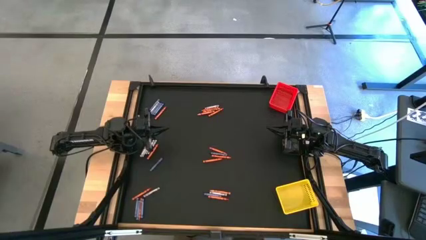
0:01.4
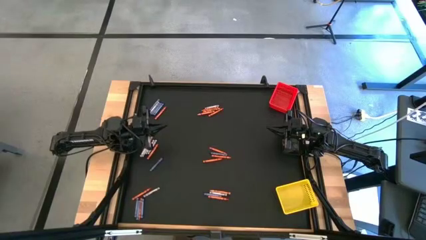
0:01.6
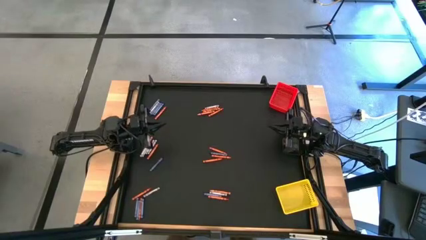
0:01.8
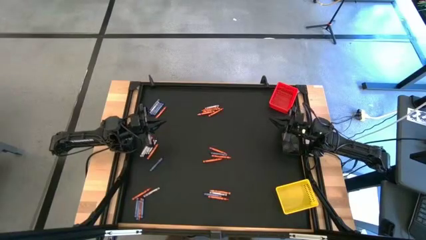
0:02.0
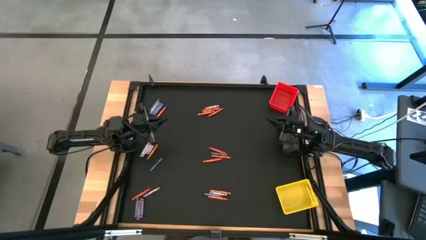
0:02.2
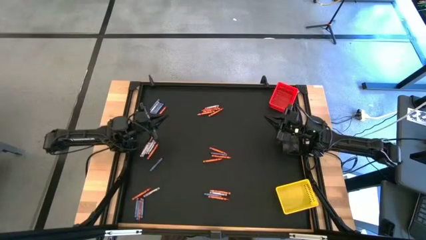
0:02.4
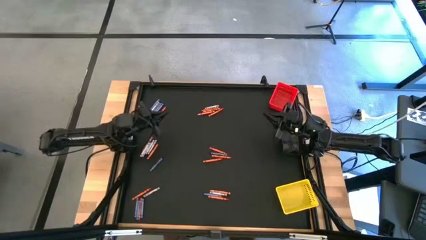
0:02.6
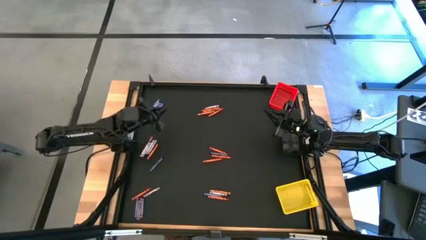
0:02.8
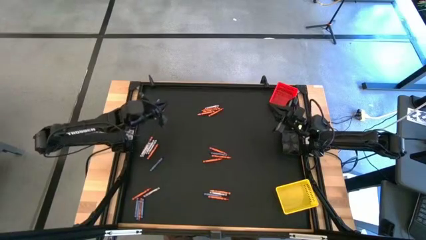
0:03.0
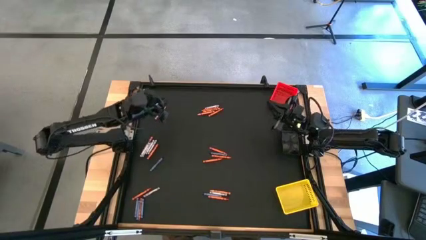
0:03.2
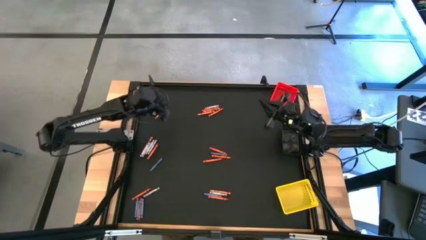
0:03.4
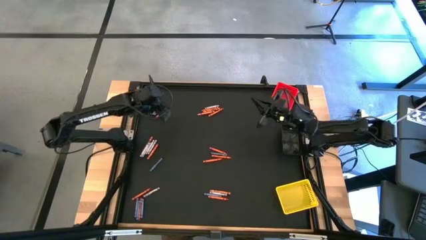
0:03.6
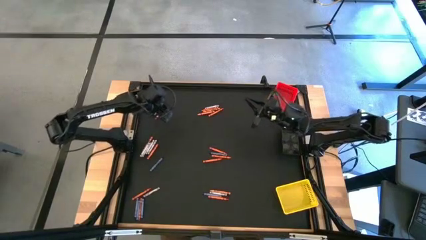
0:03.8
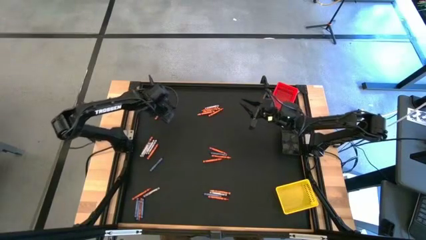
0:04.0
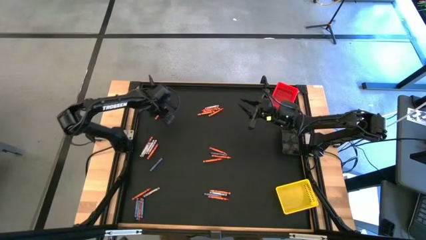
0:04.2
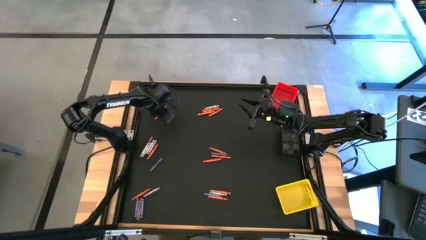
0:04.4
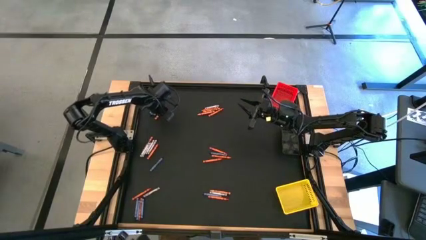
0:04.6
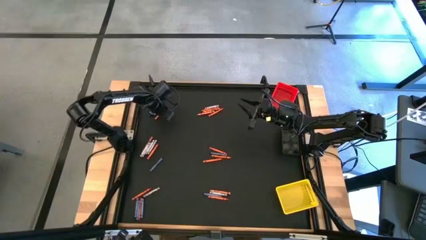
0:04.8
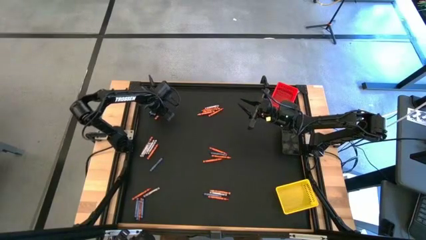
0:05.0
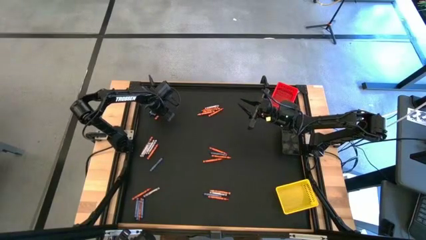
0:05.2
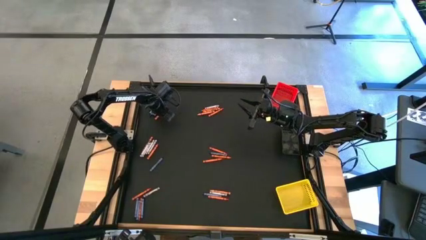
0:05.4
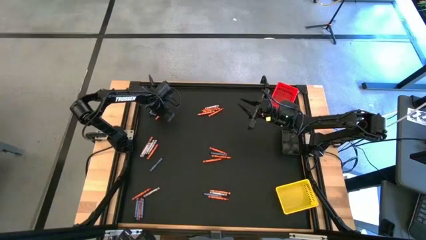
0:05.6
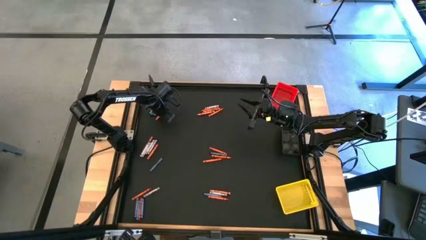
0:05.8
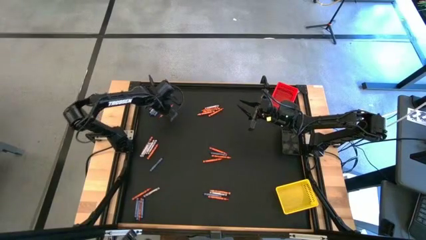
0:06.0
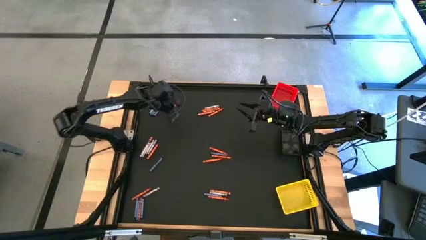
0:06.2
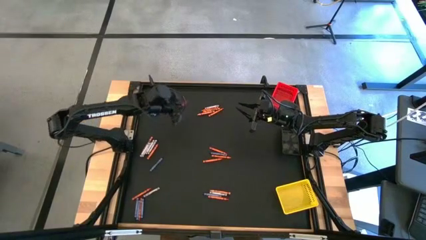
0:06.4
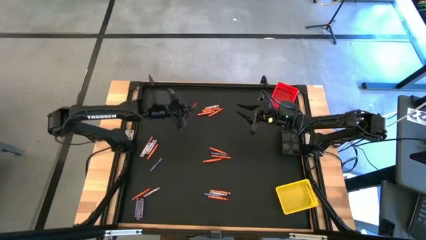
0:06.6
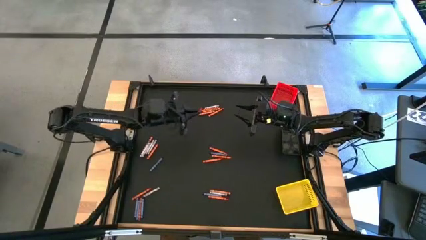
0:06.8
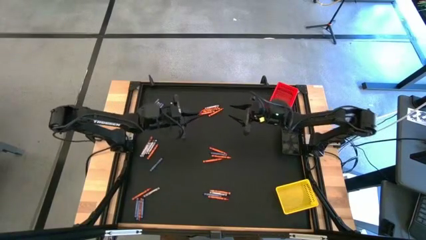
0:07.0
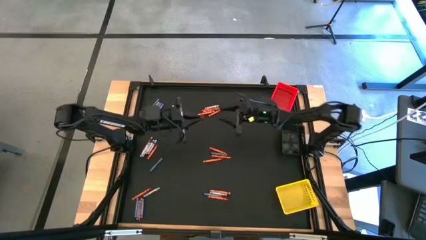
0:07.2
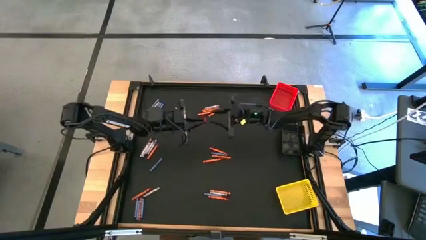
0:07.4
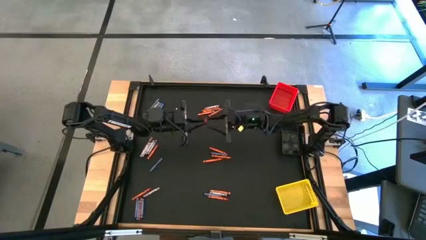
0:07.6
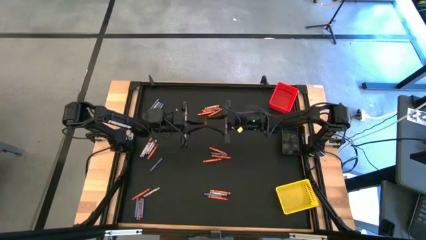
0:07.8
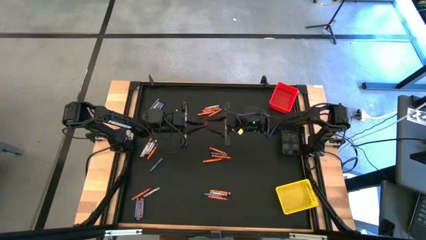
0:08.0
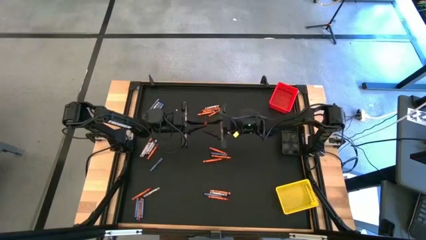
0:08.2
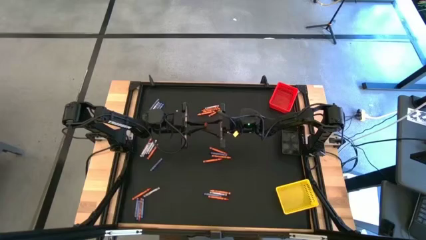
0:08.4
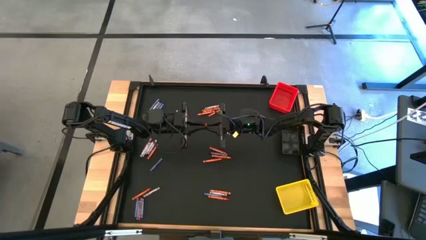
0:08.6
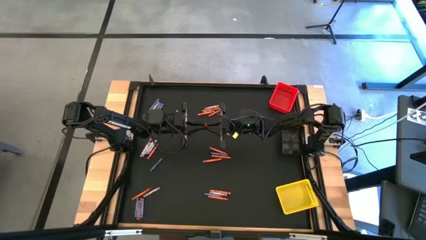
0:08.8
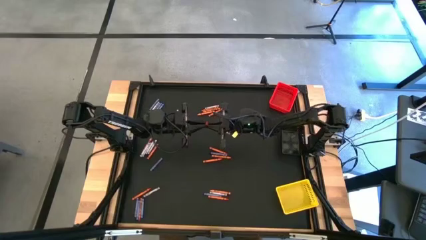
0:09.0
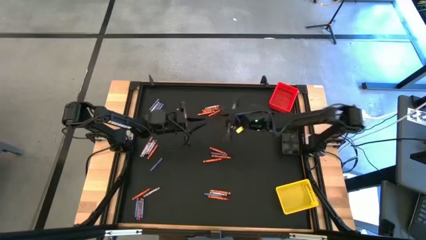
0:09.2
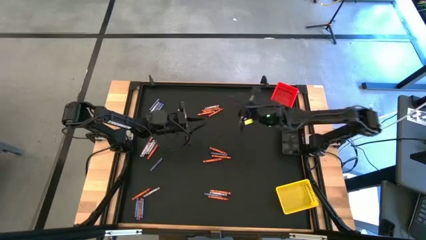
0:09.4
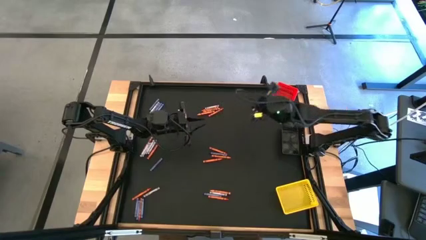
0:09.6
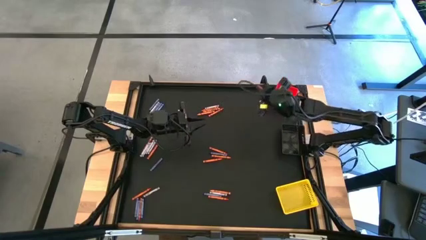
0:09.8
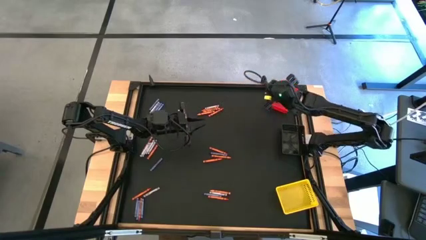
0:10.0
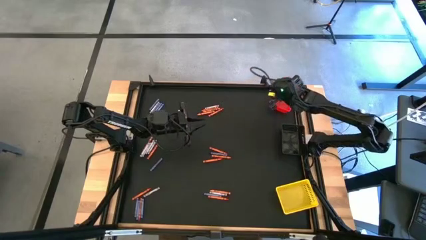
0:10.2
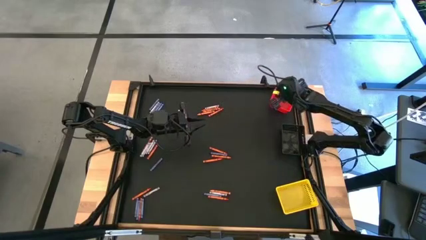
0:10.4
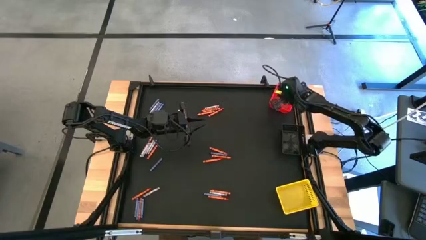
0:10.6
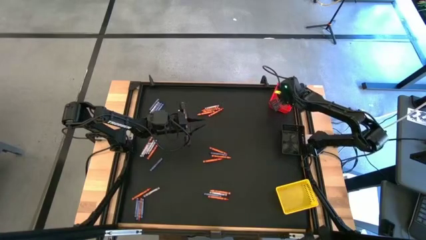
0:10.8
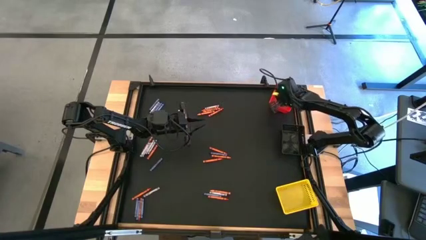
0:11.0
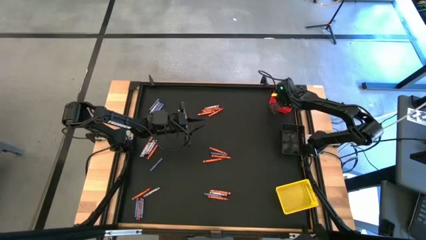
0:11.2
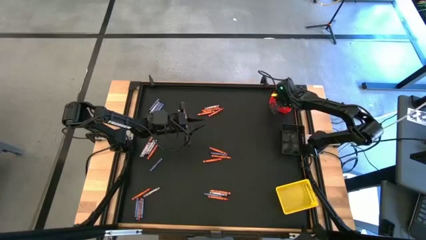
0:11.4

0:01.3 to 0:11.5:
Task: Sort crayons
Put the orange crayon into the red bin

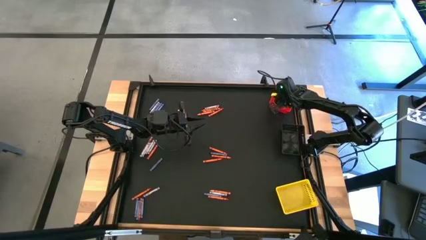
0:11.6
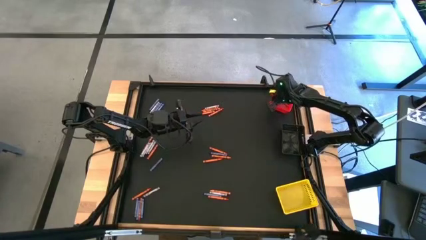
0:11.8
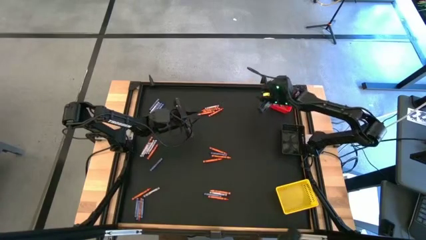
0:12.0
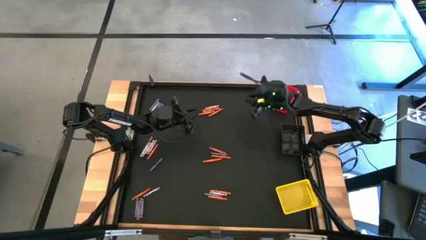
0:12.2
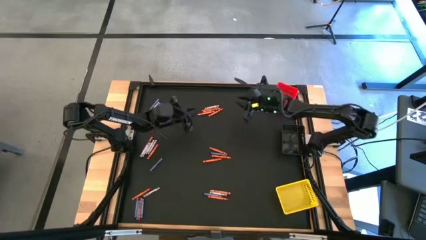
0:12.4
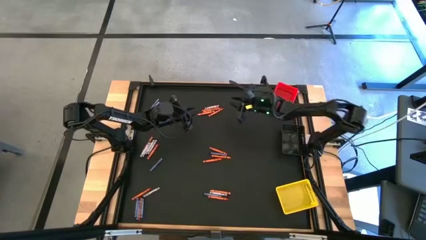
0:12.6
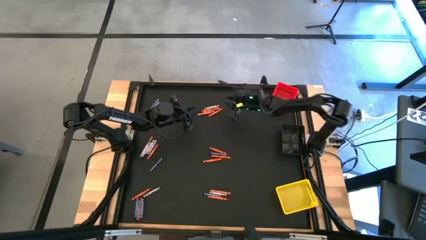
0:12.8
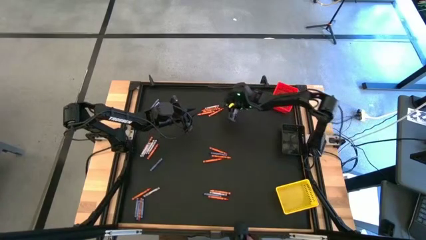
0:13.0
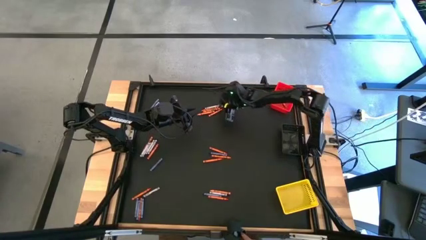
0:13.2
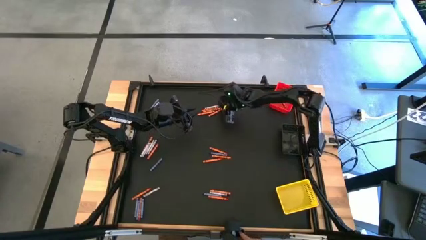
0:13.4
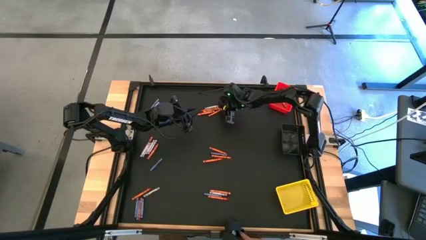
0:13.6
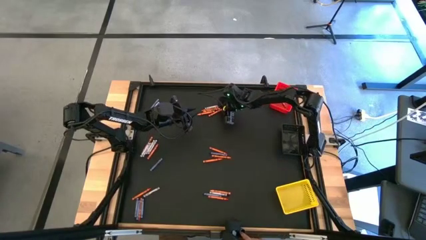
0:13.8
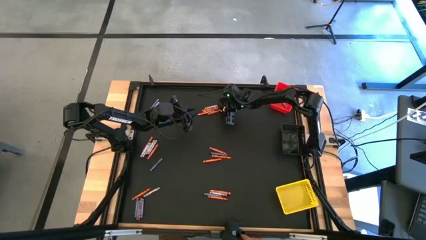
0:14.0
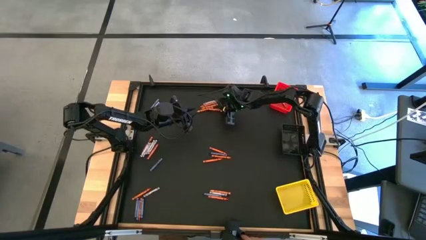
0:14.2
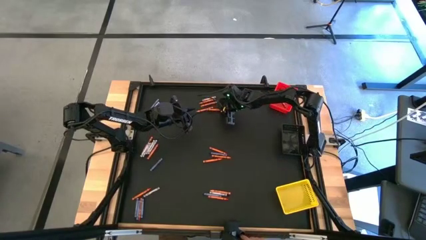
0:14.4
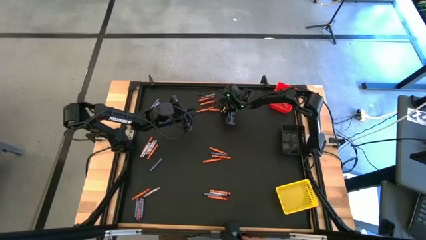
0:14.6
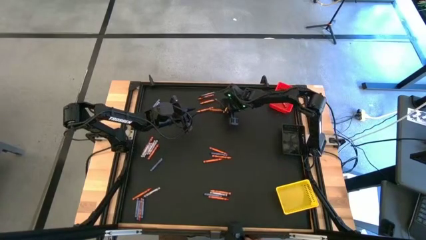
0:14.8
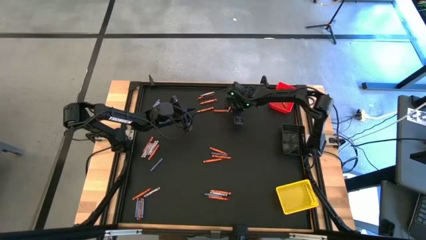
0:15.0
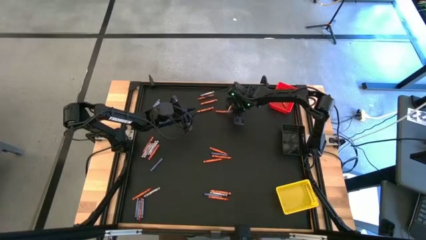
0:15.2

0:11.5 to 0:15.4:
Put the orange crayon into the red bin

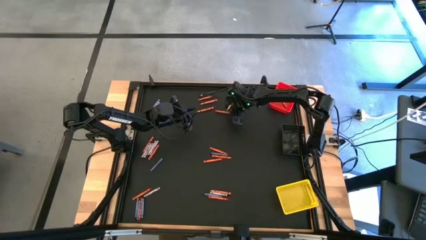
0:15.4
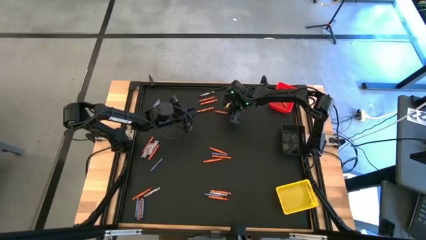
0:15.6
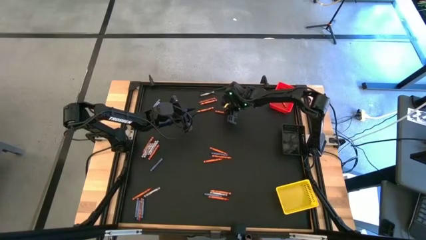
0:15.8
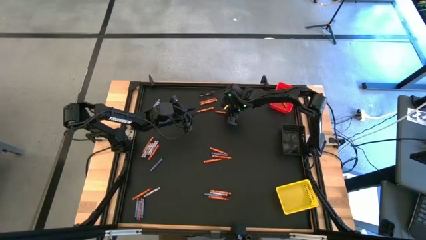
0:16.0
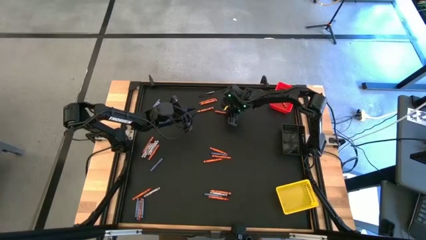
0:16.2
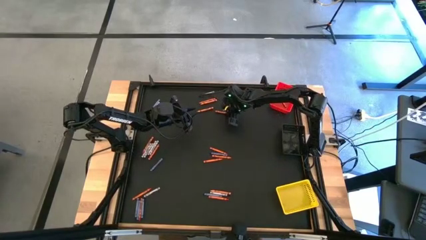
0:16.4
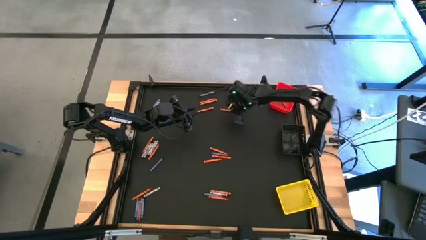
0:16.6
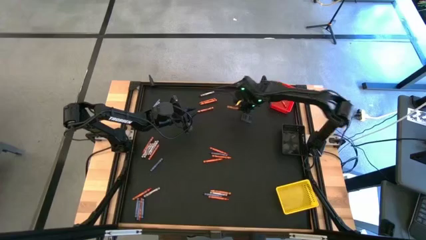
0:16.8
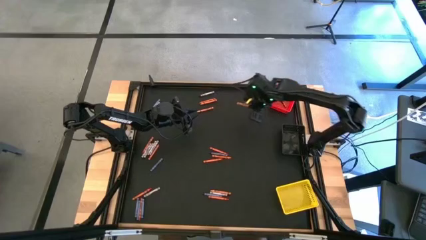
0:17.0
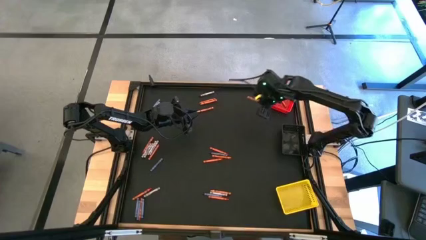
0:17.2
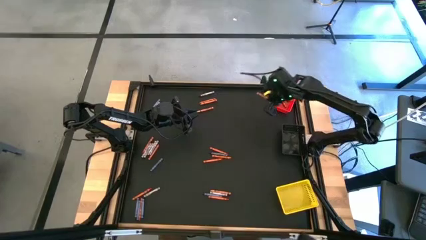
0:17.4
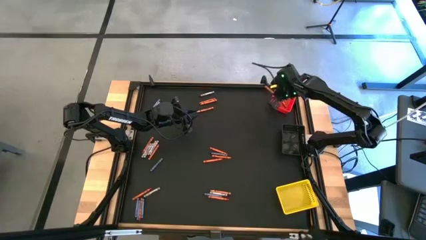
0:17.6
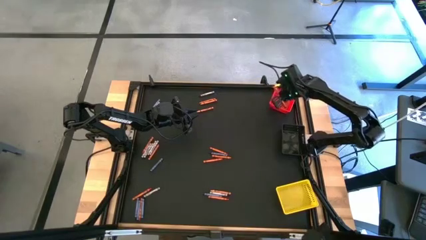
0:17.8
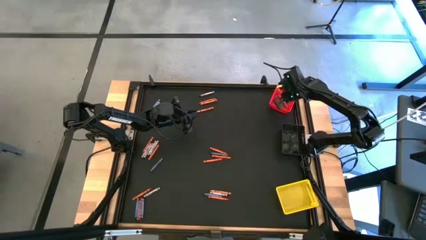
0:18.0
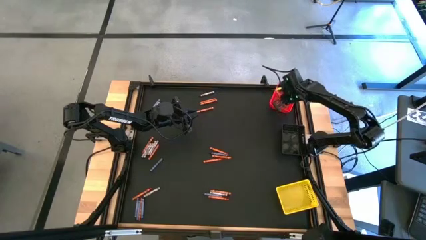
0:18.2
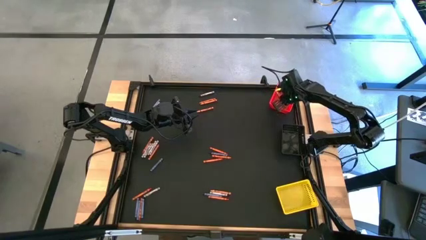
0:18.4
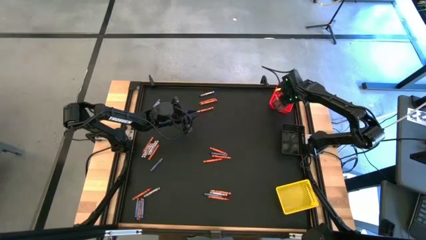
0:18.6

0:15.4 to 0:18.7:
Put the orange crayon into the red bin
